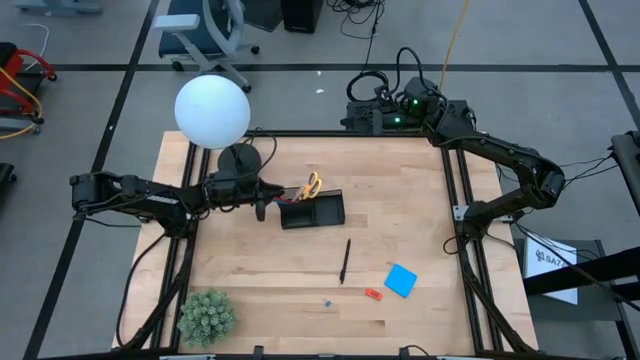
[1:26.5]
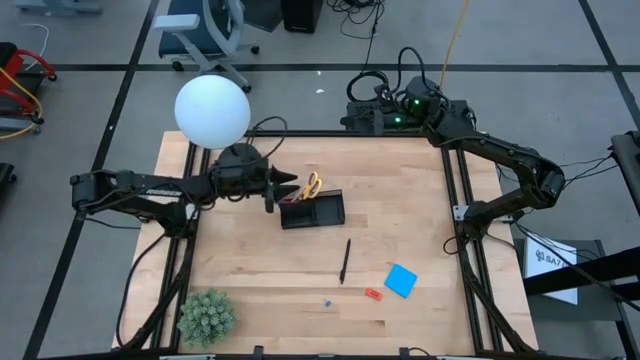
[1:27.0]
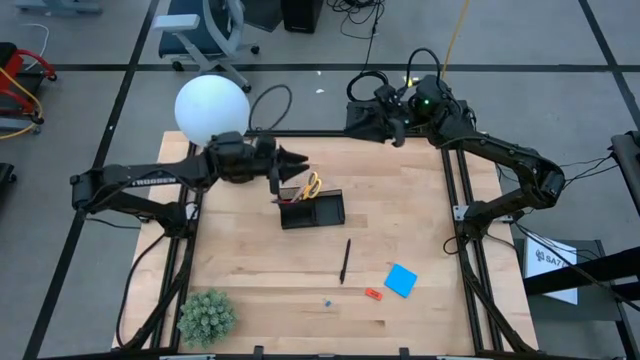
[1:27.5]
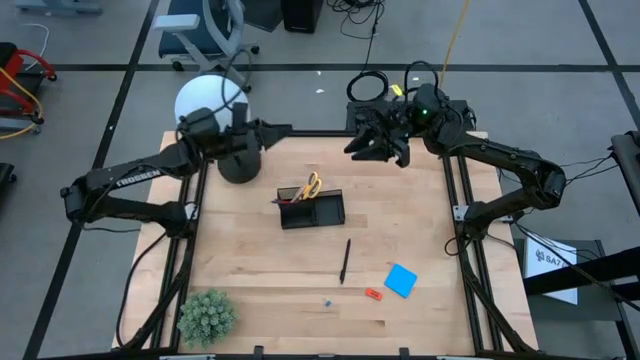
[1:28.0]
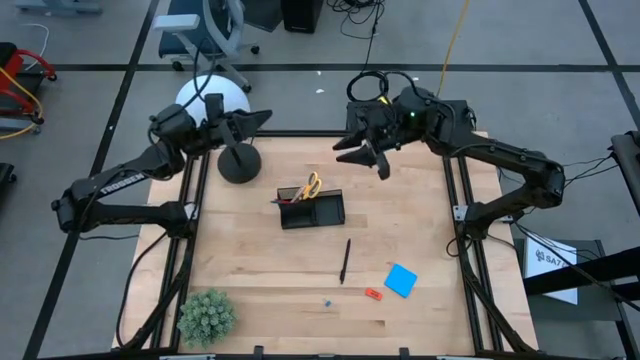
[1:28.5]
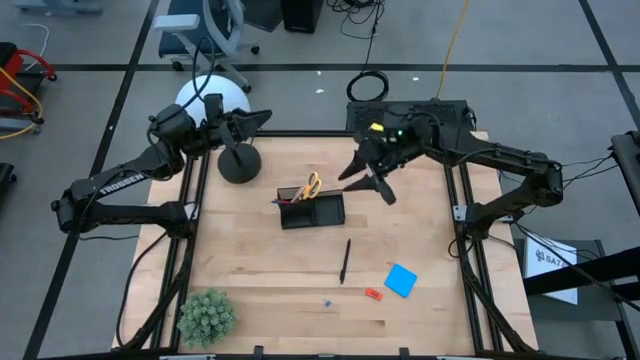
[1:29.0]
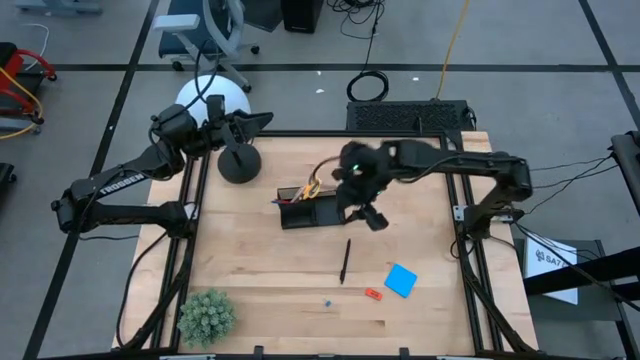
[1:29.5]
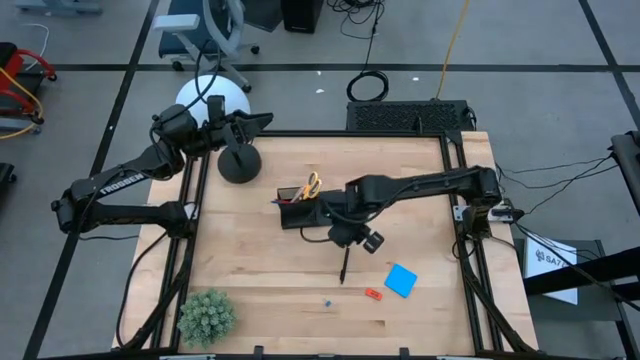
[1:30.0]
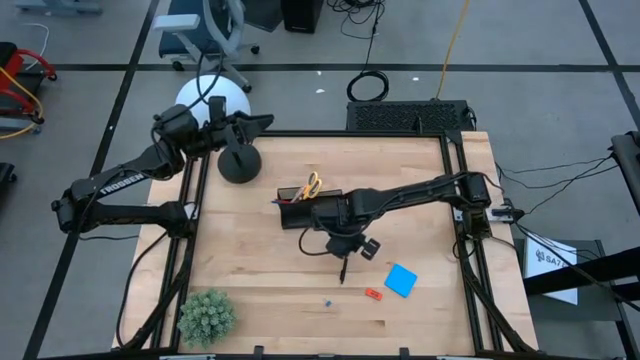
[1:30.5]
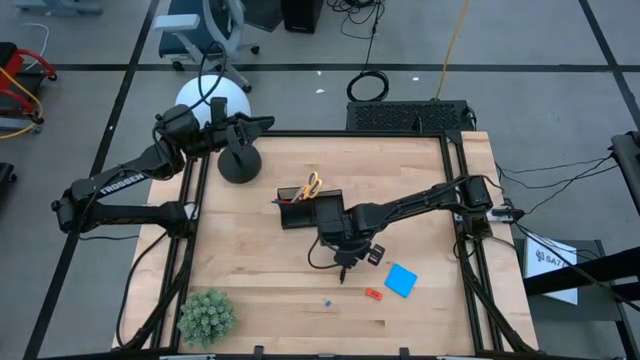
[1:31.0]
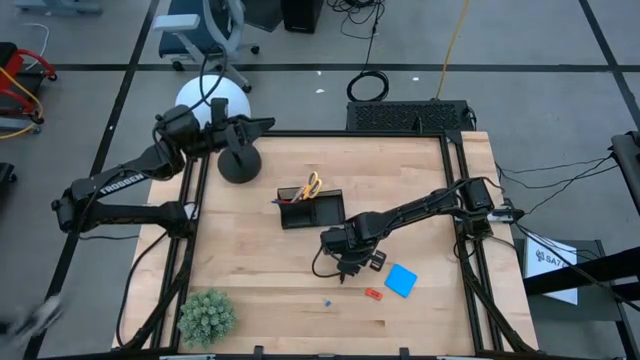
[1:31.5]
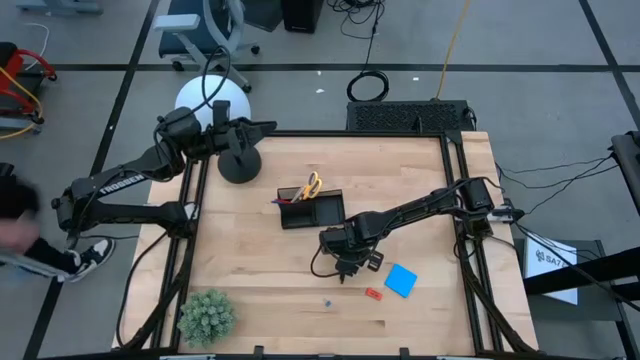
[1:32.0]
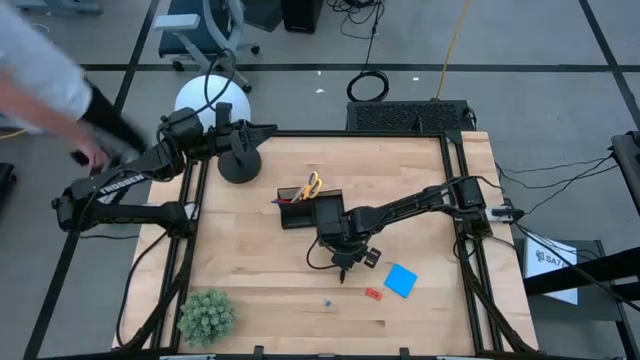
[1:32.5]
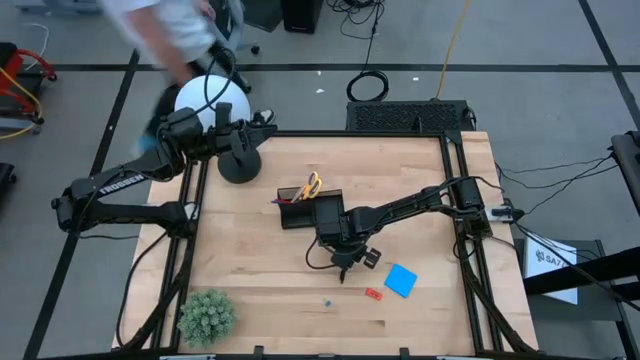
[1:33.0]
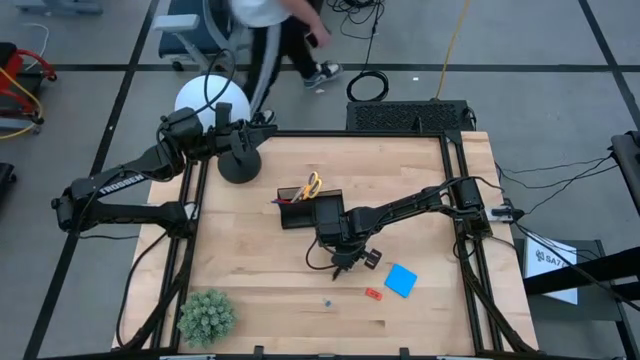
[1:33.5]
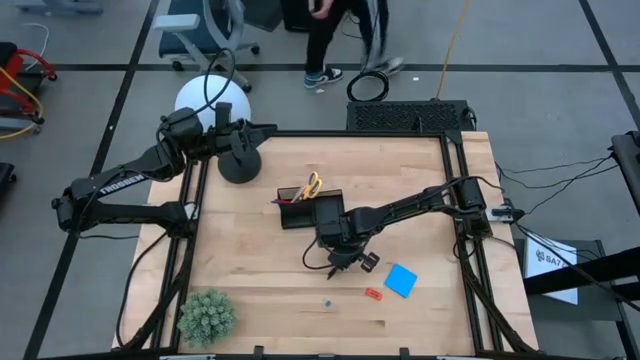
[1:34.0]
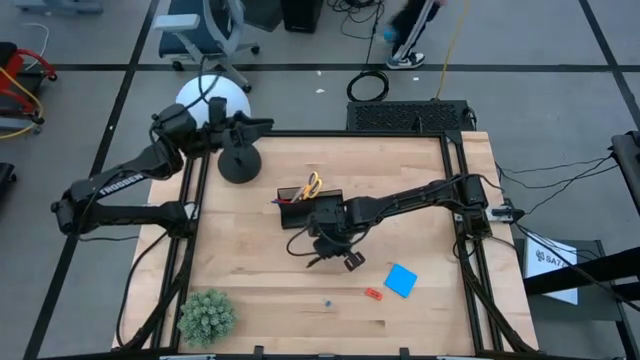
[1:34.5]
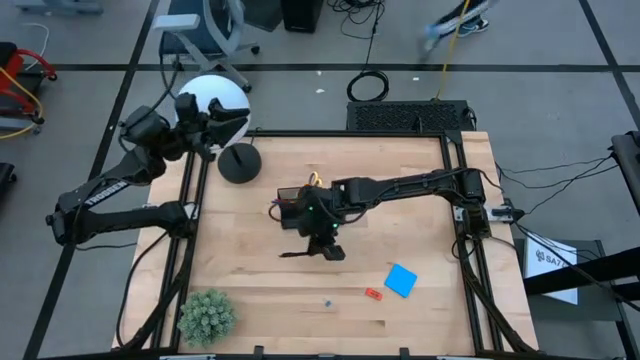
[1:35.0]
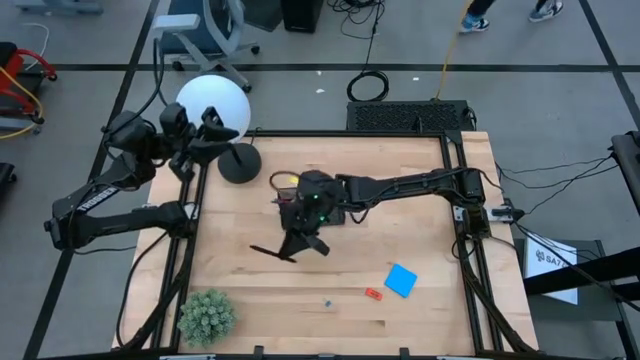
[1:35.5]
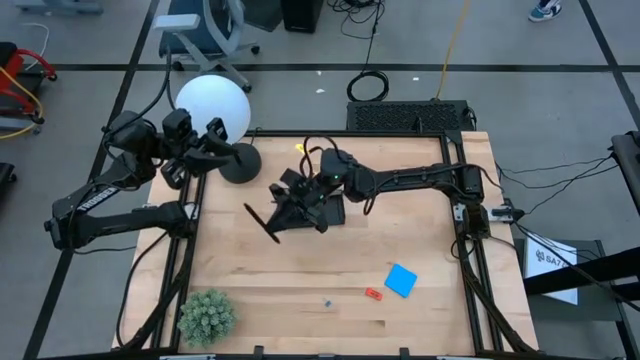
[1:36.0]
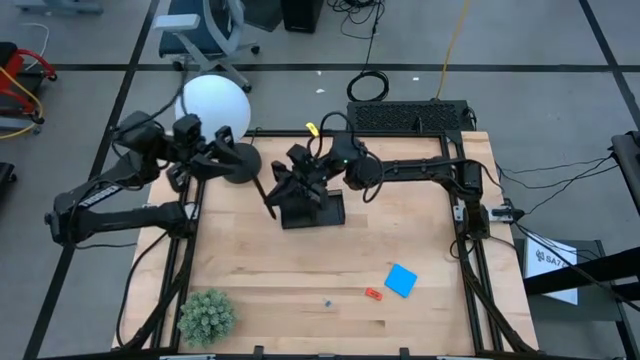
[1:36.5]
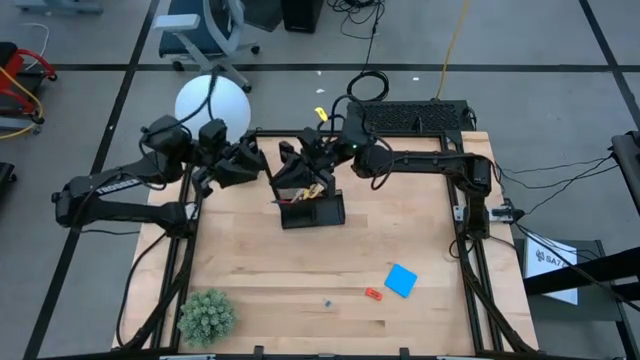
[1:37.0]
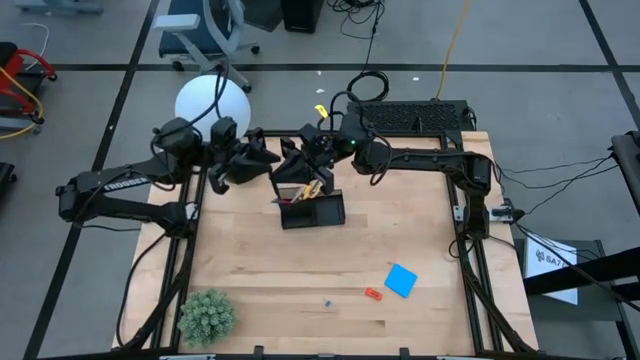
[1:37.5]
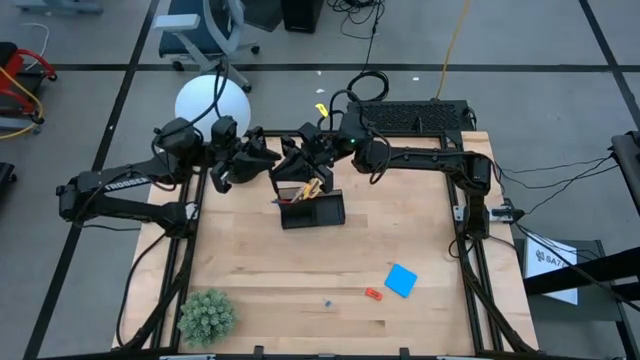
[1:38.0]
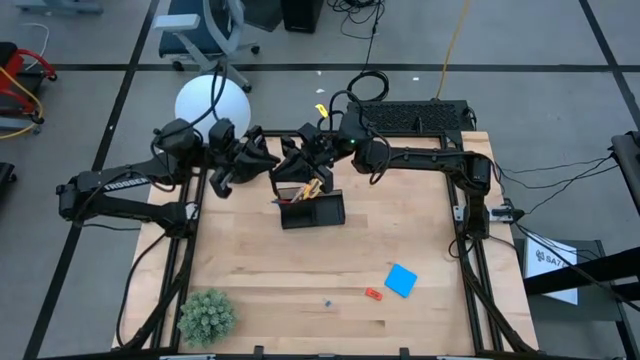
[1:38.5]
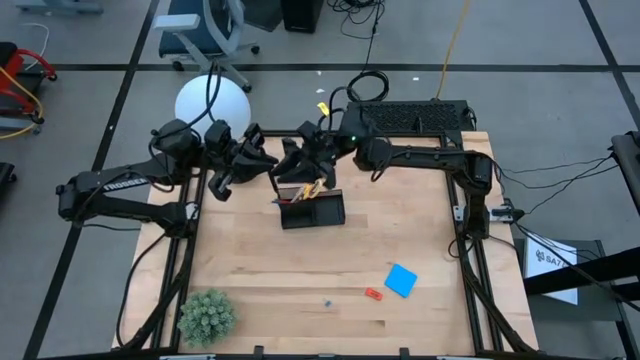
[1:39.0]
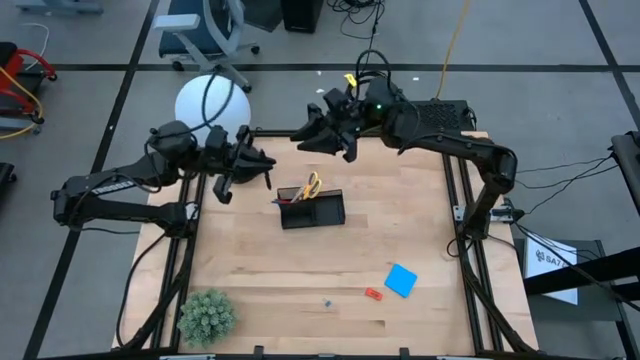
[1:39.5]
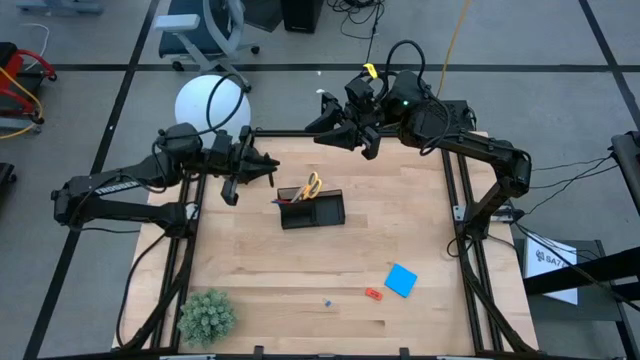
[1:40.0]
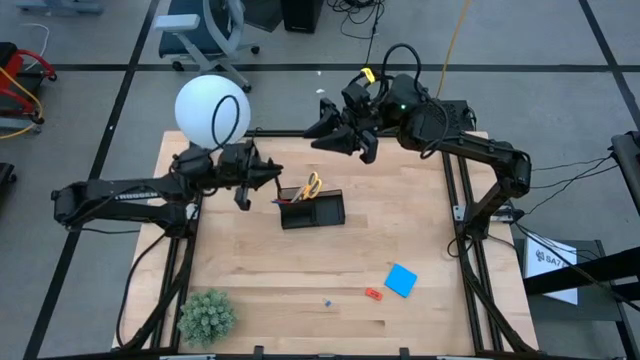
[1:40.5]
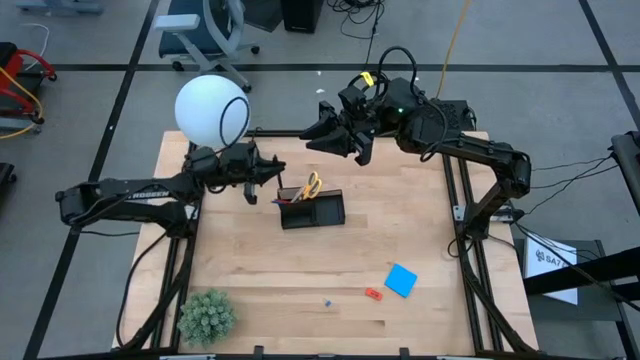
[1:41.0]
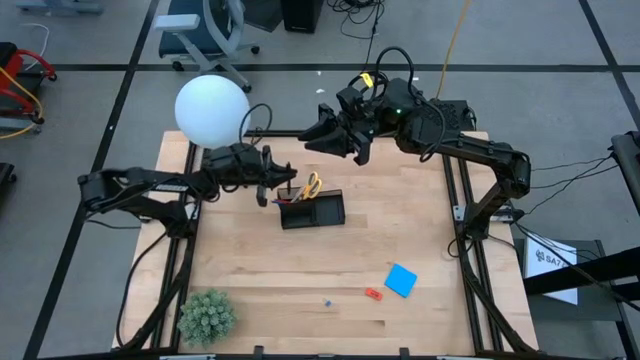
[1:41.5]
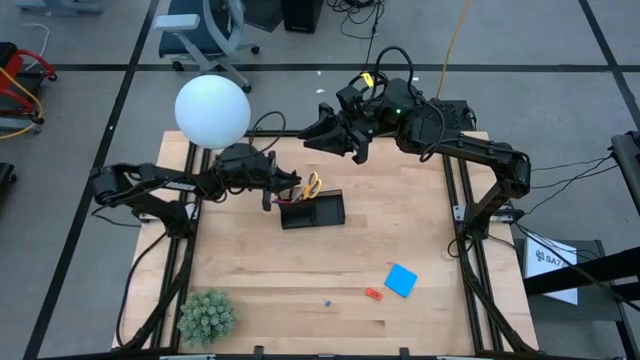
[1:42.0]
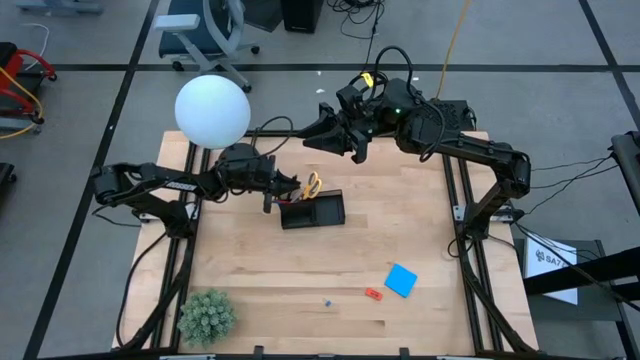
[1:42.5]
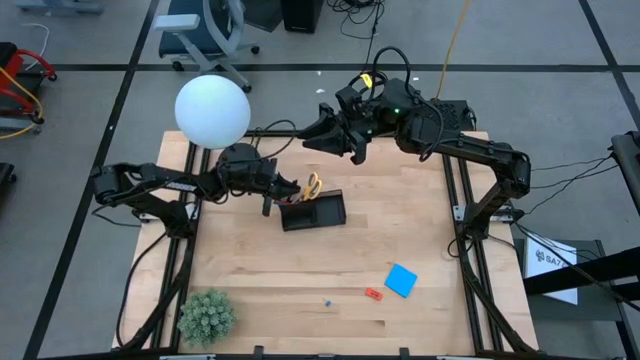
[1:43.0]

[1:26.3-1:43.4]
Task: Pick and place office supplies into organizer
Put the black pen into the black organizer
